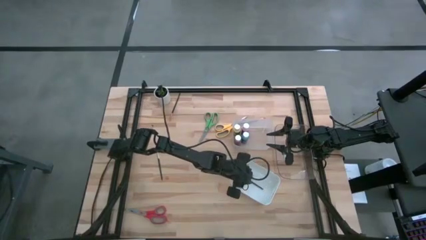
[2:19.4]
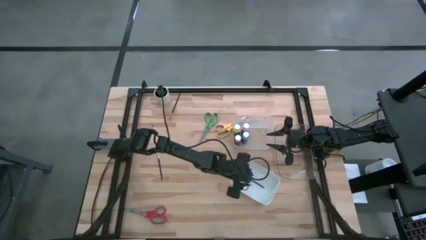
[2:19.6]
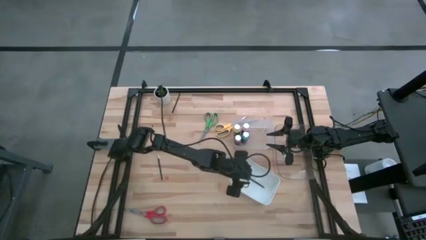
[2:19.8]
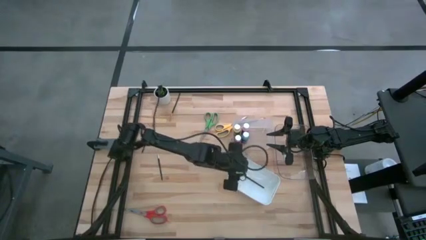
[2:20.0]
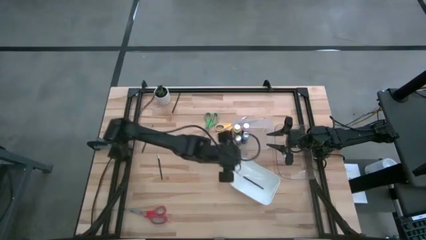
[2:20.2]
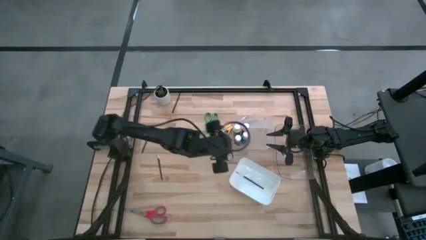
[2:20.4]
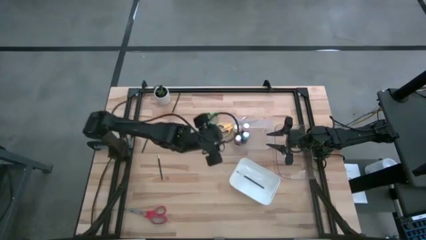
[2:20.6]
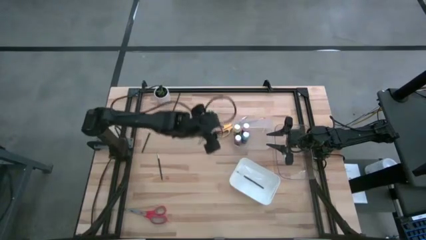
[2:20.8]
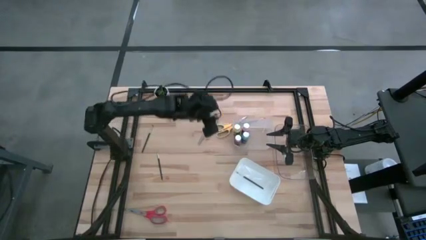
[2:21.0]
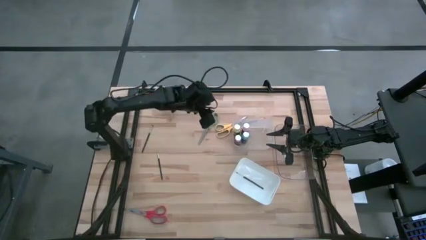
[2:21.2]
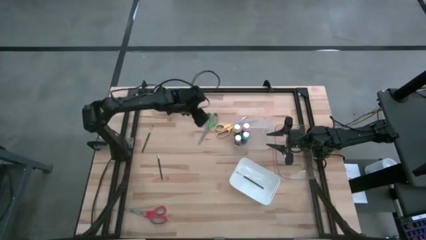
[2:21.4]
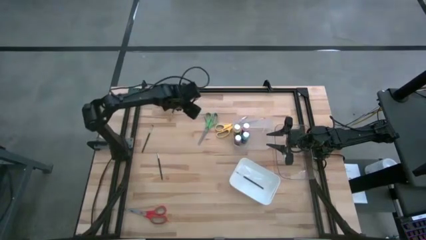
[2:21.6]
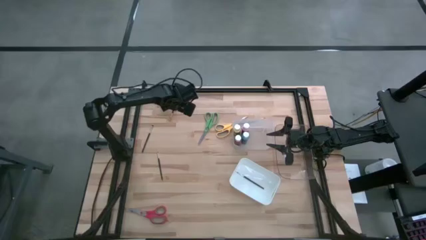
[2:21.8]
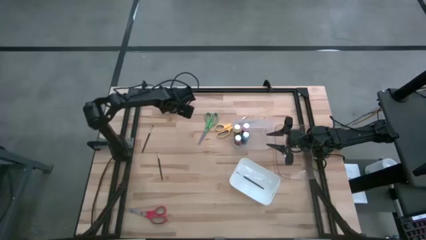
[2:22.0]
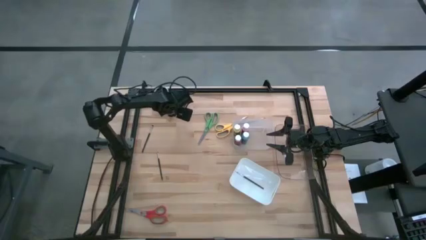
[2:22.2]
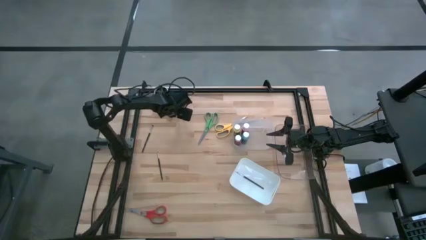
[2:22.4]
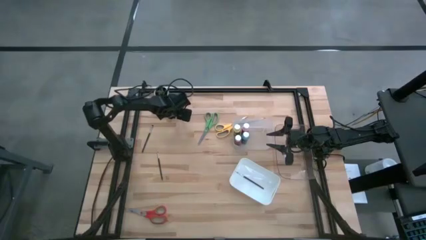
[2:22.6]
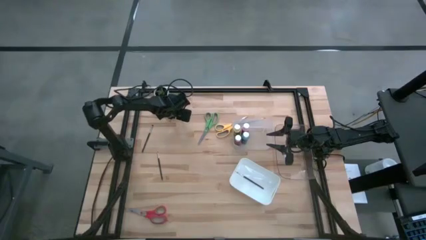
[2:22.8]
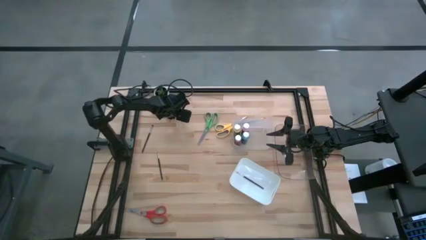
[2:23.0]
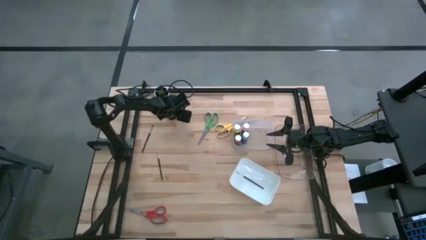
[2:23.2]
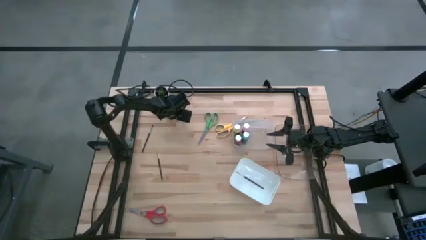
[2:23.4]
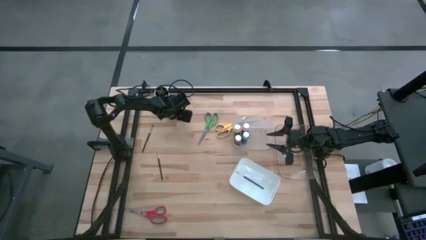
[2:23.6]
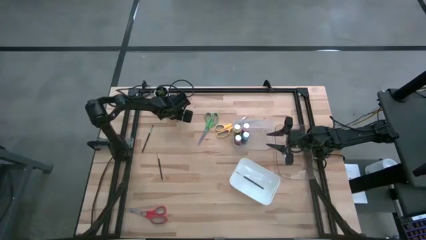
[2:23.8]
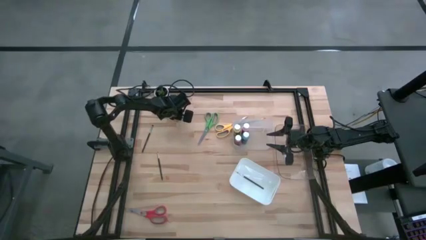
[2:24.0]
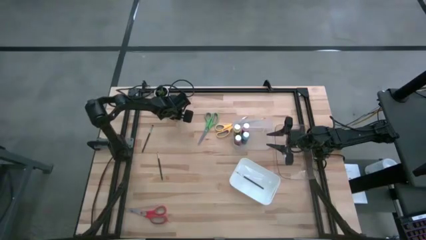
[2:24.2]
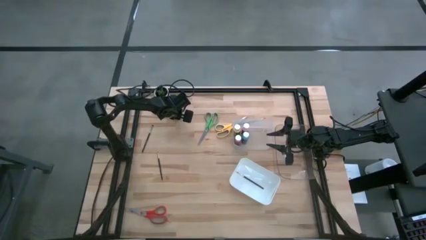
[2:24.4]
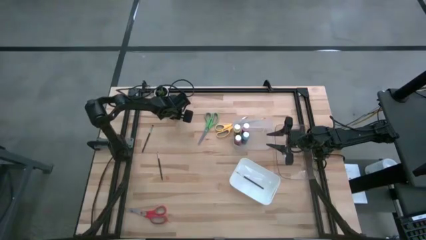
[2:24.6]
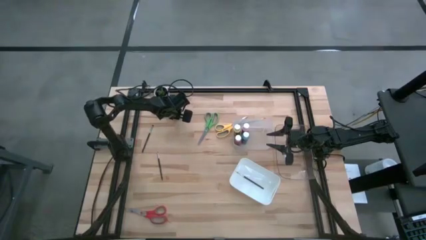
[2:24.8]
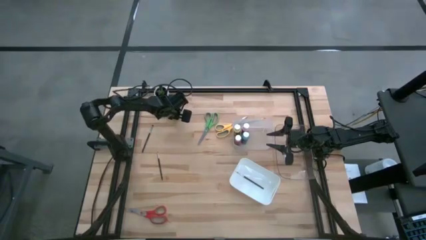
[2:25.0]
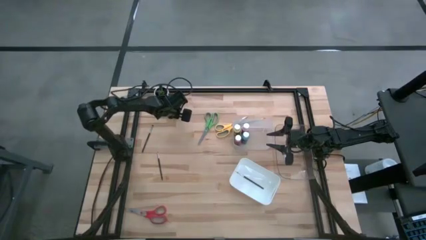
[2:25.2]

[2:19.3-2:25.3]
Task: Pick & Place Paint Supplies
Put the black paintbrush into the white bin

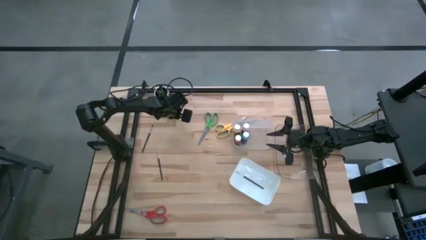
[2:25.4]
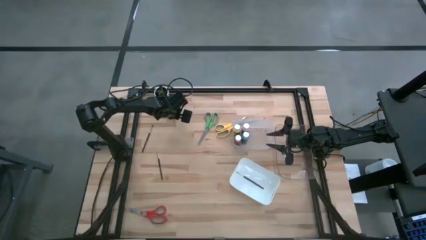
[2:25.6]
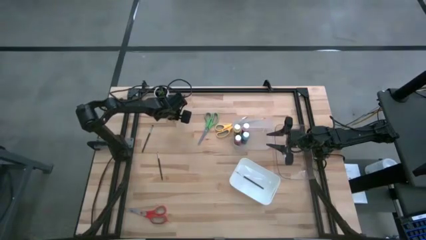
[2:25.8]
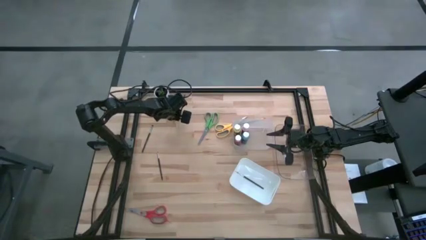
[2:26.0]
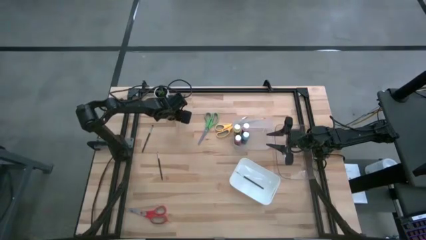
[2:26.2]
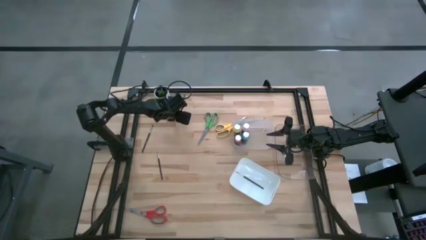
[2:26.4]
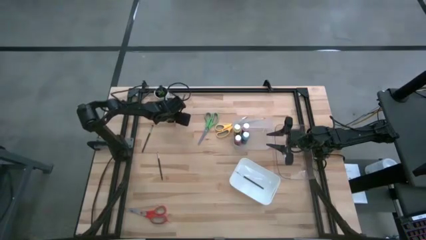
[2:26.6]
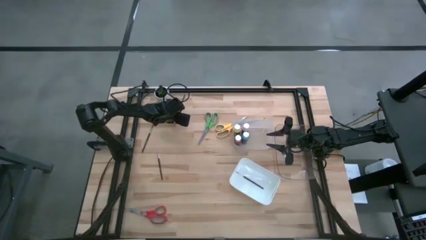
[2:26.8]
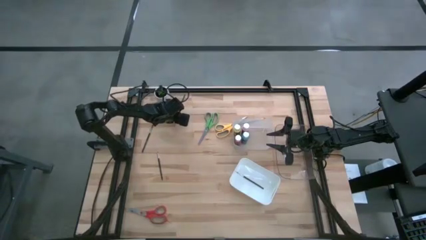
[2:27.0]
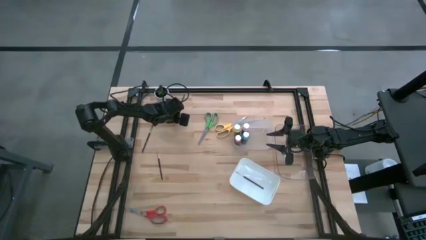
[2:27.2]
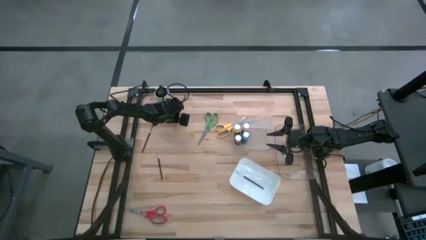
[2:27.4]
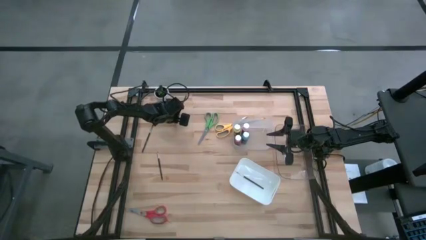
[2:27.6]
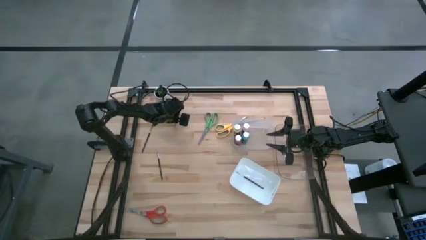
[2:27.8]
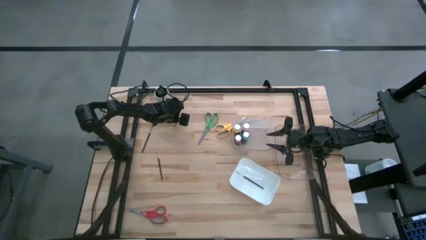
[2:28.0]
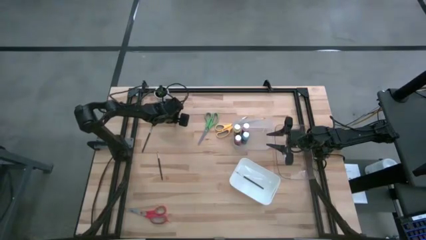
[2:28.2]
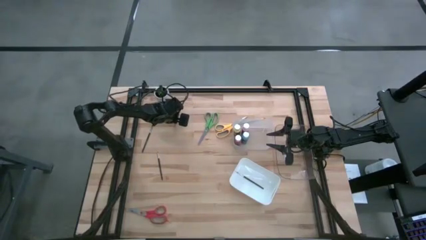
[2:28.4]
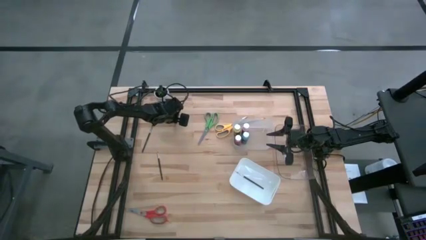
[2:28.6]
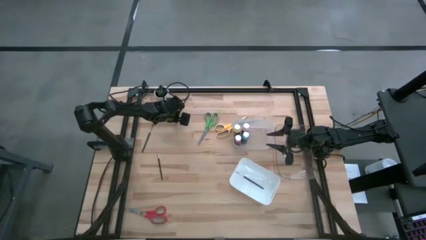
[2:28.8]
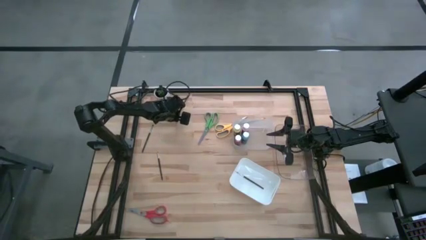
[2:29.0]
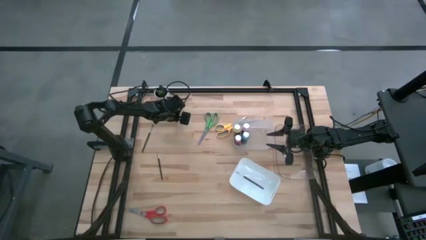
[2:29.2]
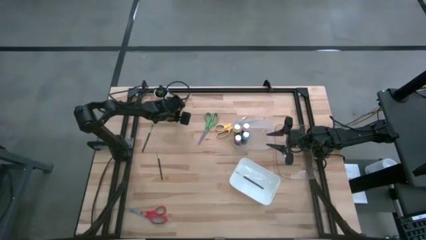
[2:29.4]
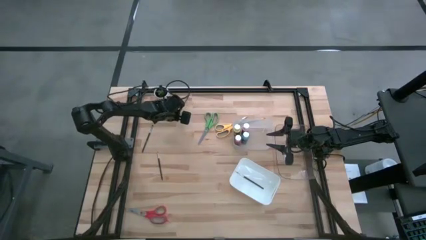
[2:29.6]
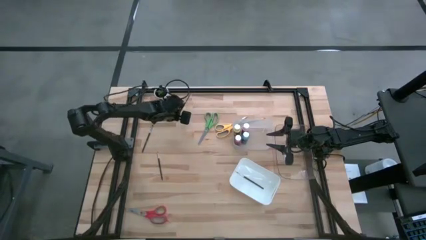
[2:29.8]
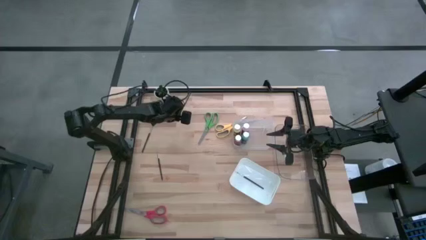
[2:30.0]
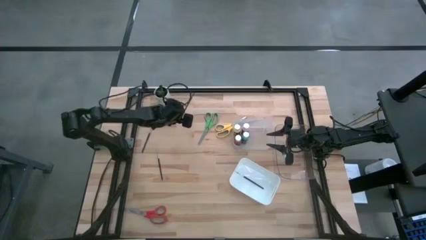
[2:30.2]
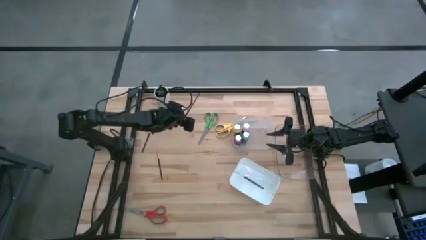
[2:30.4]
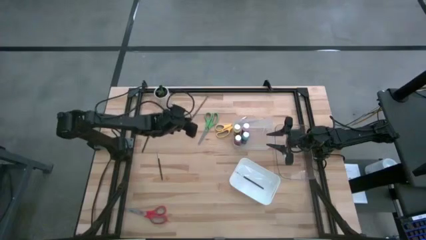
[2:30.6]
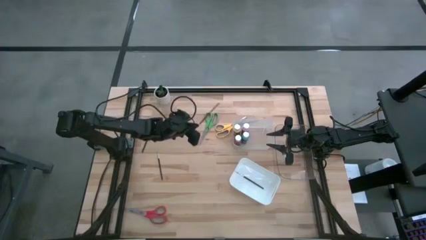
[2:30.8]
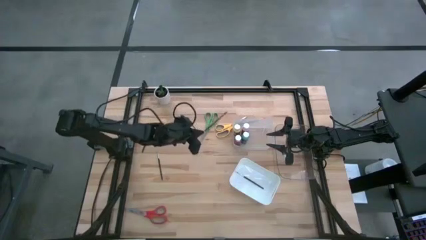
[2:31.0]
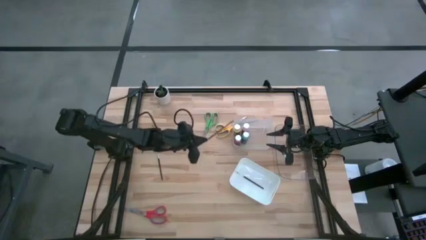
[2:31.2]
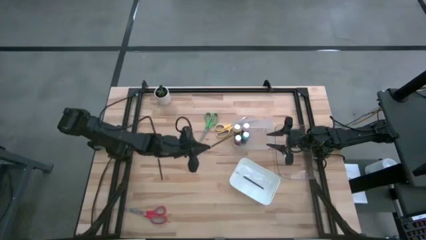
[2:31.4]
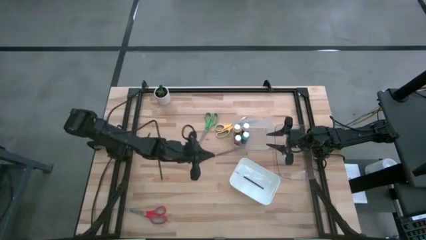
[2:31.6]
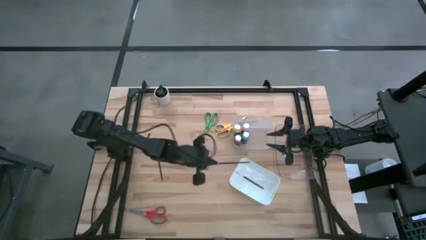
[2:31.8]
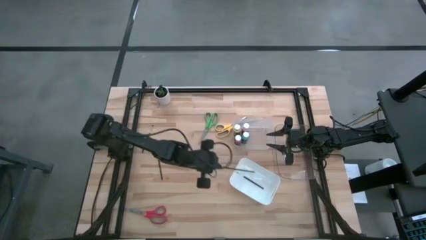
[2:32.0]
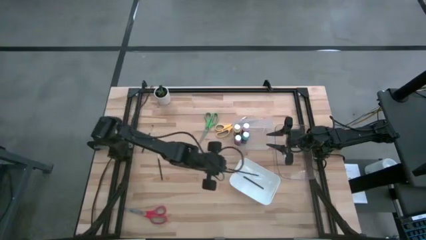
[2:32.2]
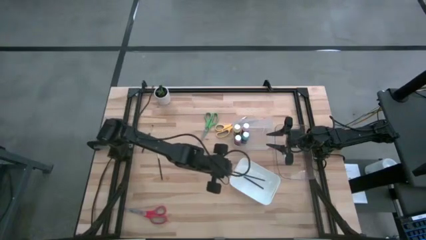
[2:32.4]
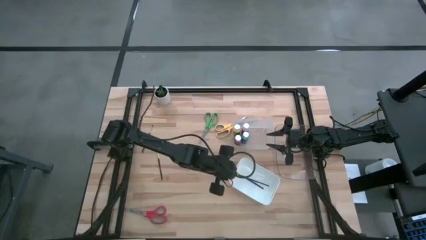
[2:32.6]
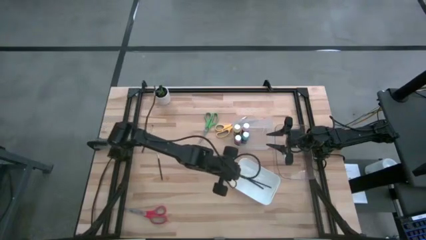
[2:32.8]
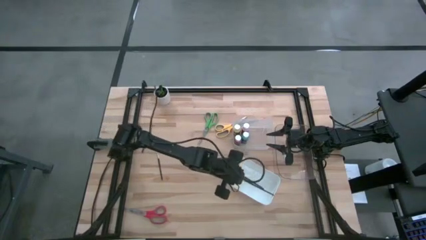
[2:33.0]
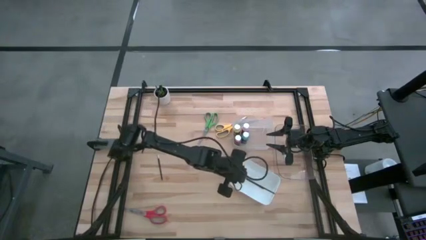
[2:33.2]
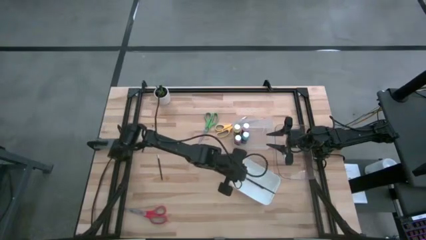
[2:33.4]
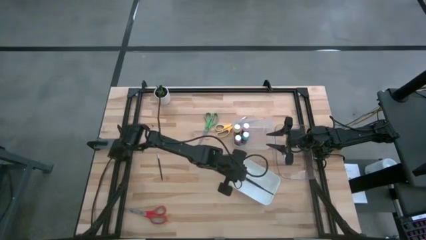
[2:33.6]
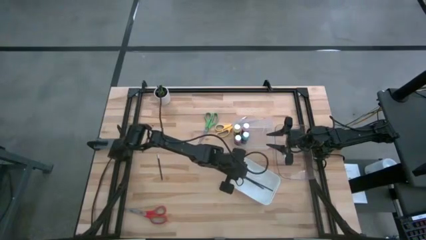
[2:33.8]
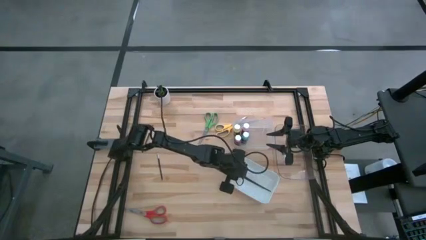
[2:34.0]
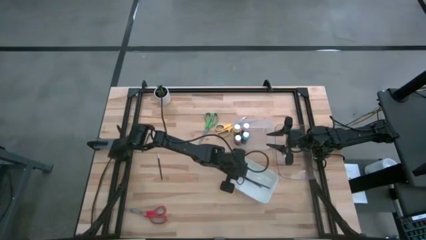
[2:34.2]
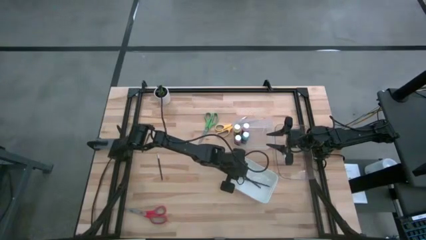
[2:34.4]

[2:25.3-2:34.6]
Put the black paintbrush into the white bin

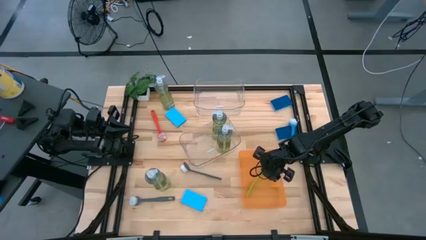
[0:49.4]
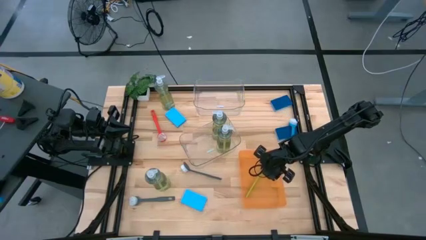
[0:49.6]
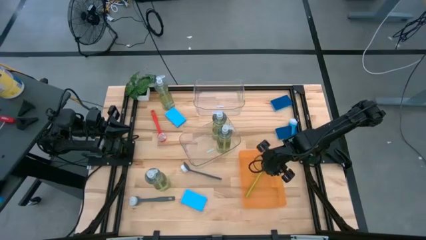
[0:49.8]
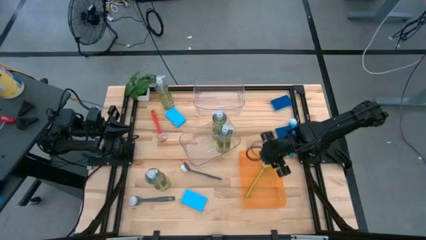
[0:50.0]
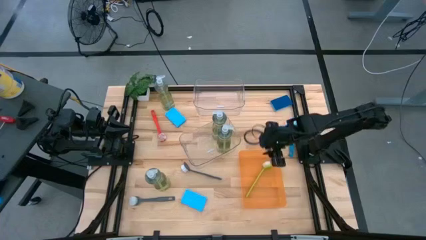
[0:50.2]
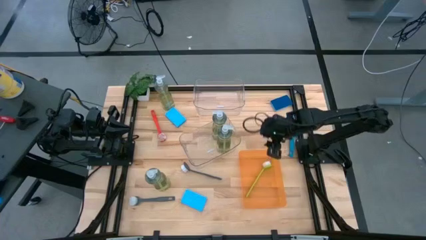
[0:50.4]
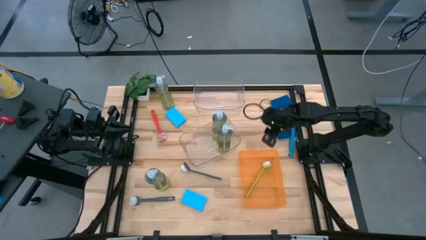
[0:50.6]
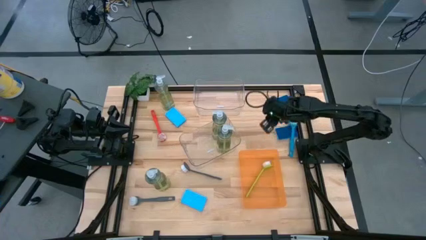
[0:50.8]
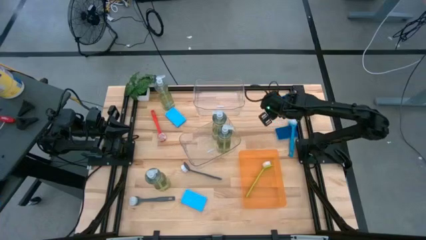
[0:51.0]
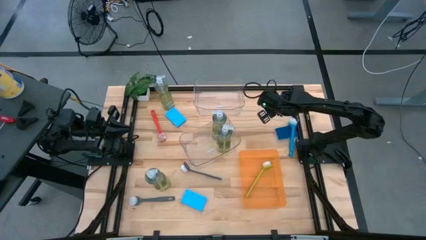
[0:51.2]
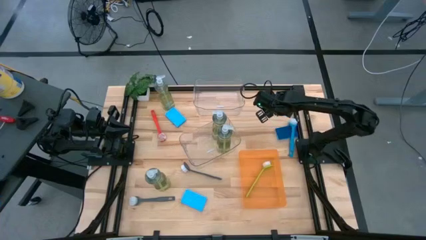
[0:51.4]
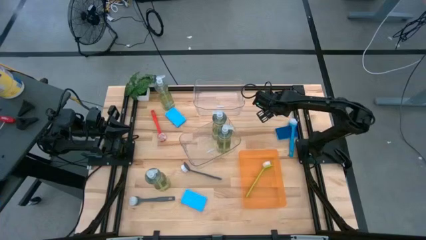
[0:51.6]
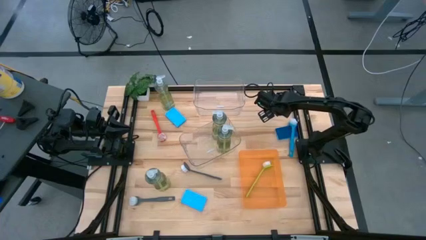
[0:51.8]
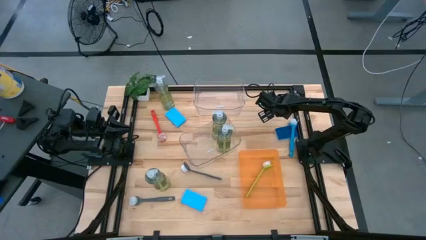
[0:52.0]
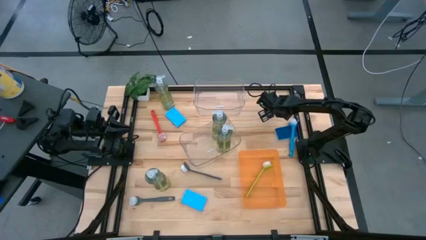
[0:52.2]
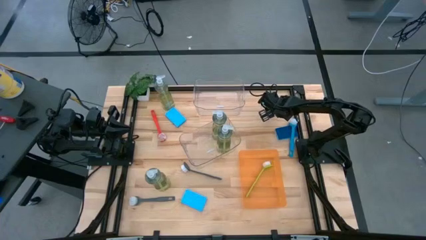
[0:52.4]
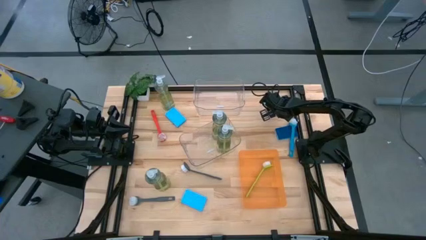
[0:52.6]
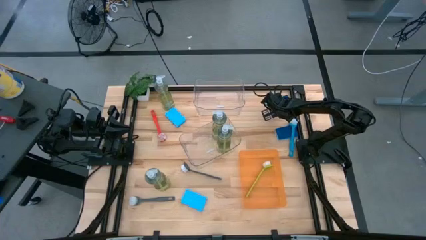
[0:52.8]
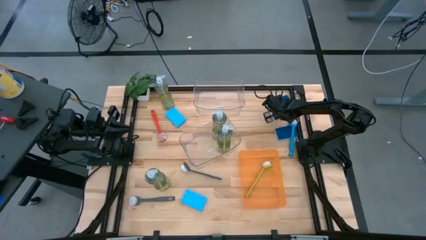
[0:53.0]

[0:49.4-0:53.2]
Task: Pick & Place Kitchen Sink Supplies
Put the blue sponge into the top transparent bin
